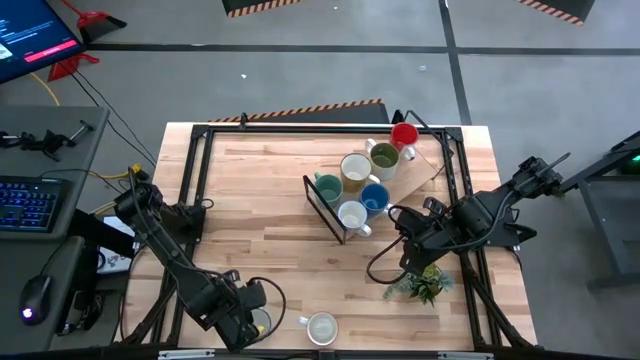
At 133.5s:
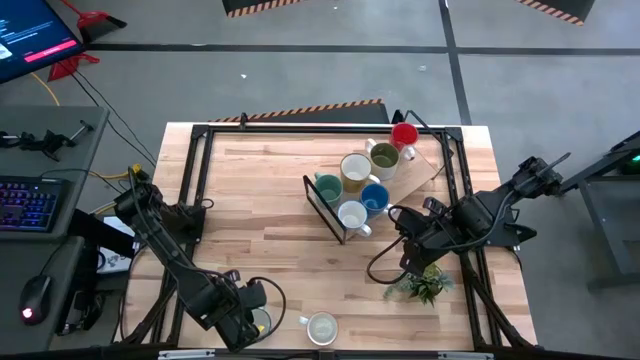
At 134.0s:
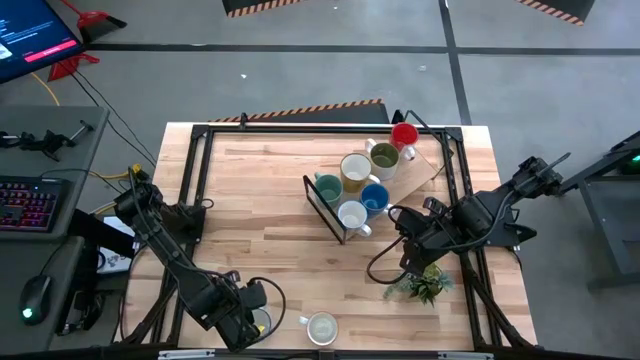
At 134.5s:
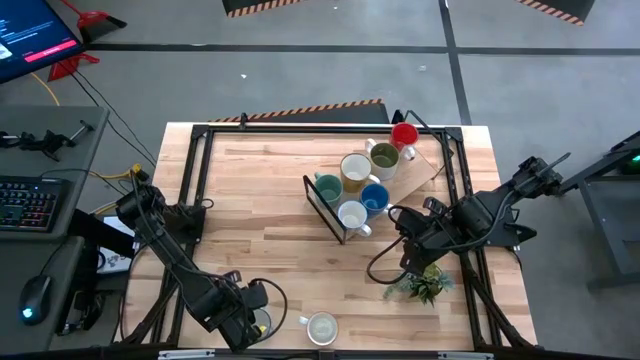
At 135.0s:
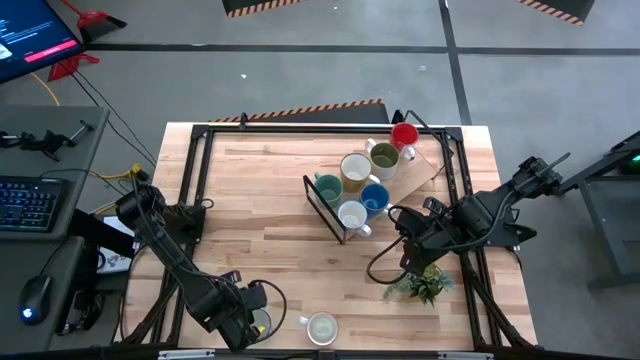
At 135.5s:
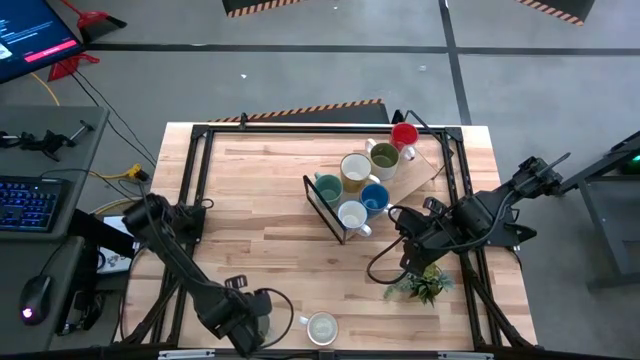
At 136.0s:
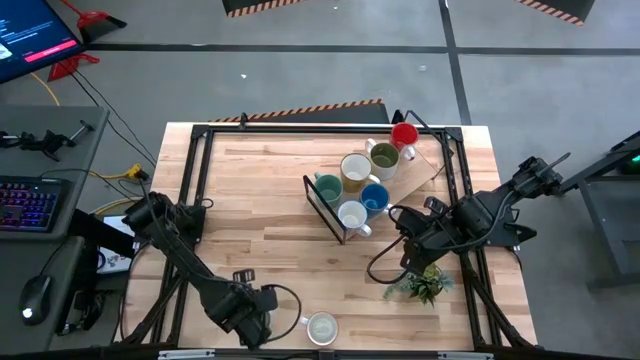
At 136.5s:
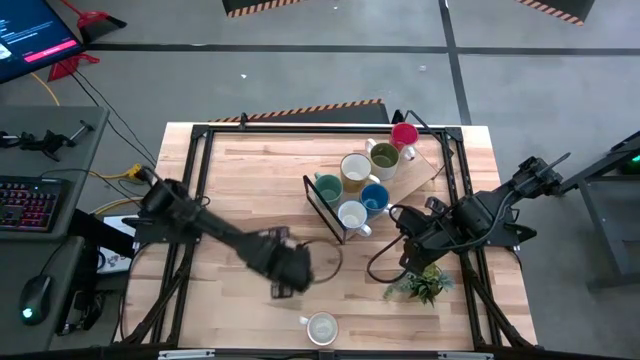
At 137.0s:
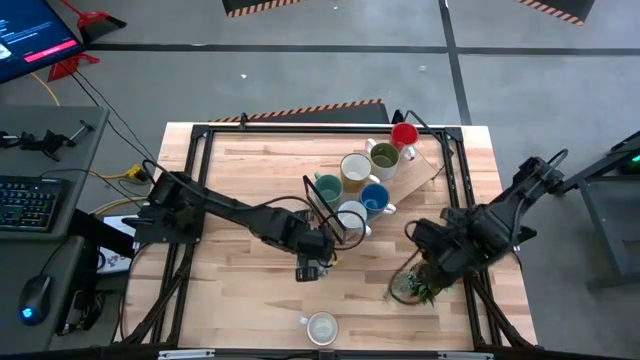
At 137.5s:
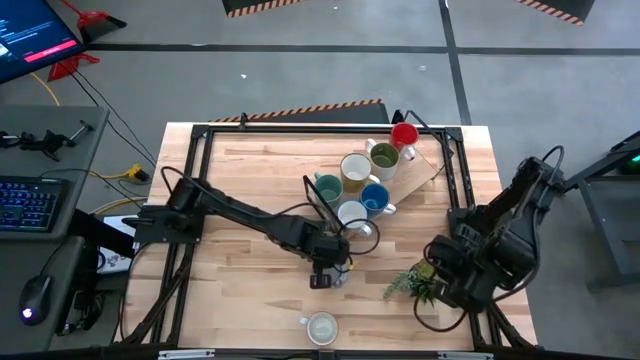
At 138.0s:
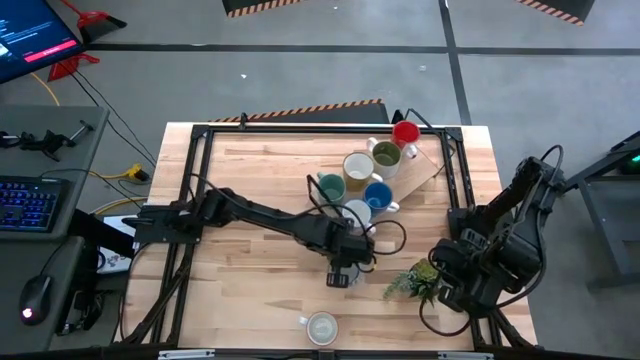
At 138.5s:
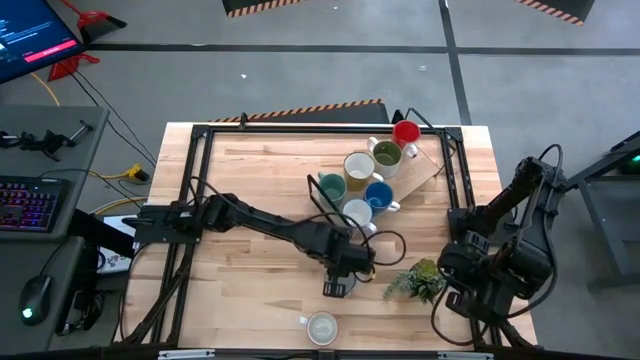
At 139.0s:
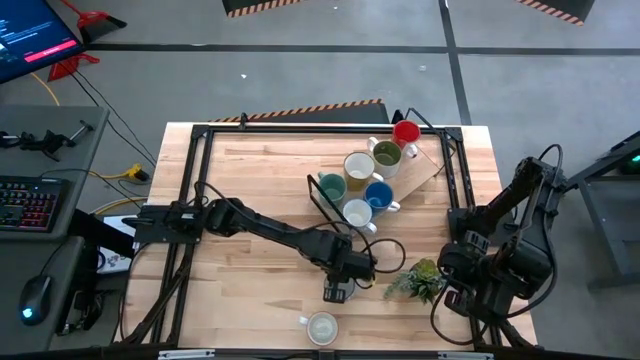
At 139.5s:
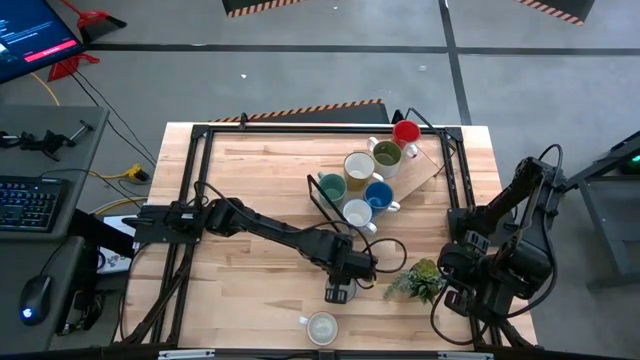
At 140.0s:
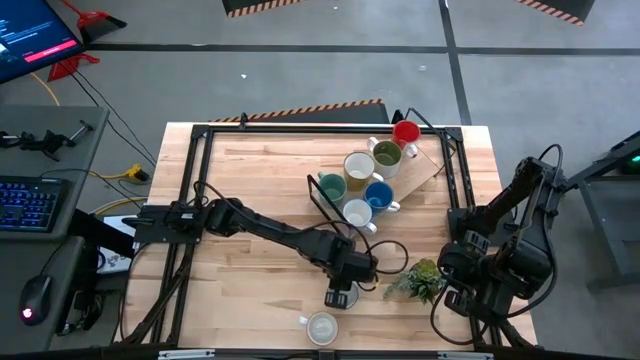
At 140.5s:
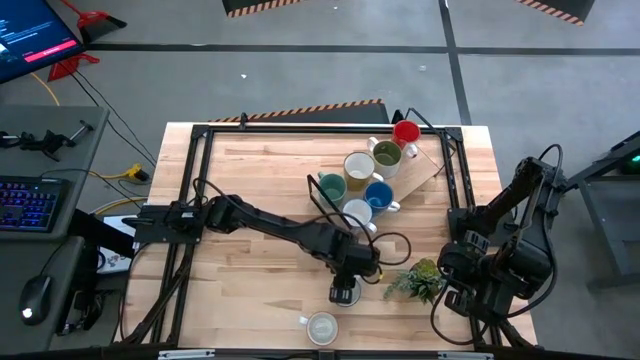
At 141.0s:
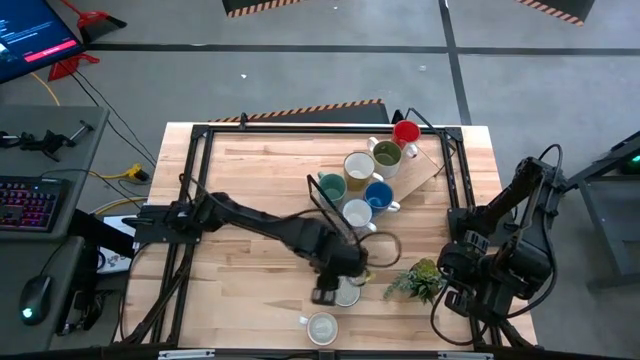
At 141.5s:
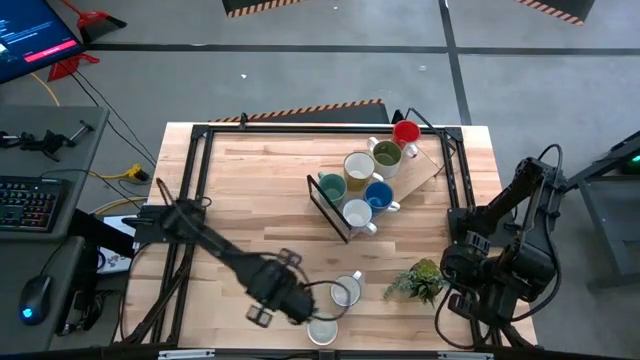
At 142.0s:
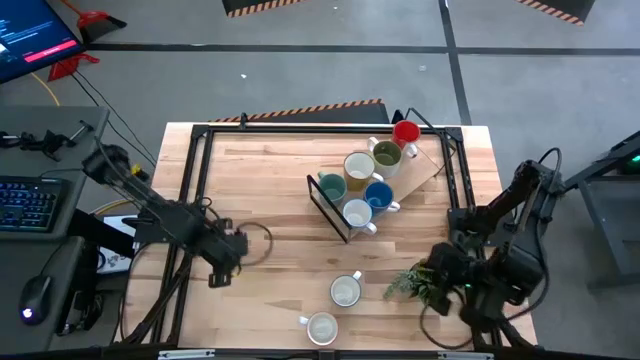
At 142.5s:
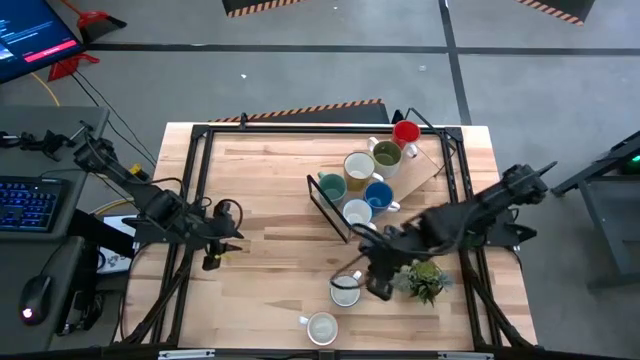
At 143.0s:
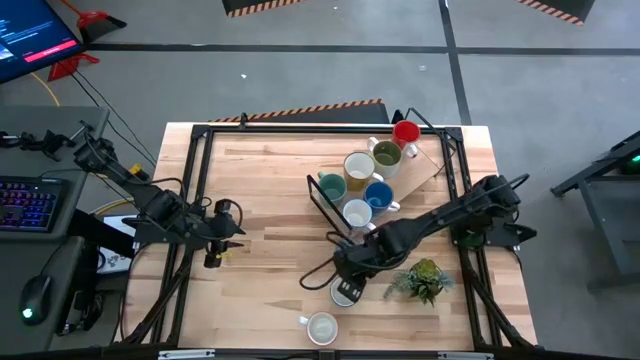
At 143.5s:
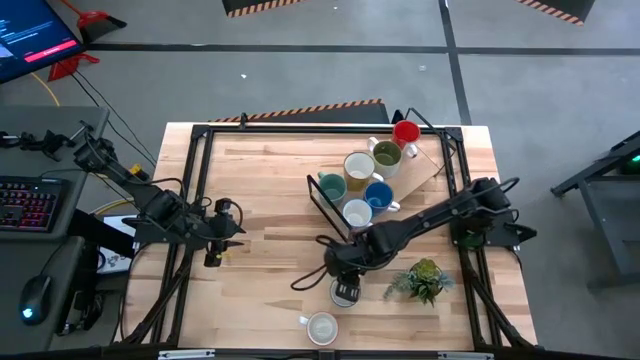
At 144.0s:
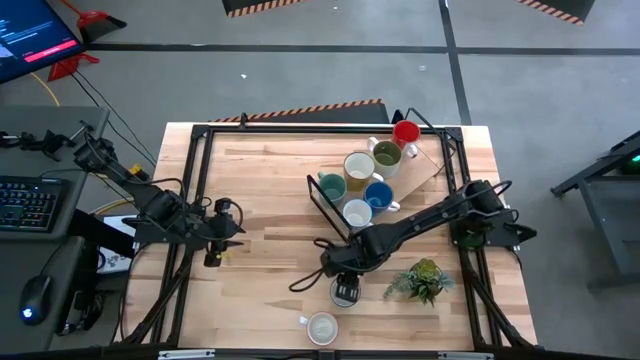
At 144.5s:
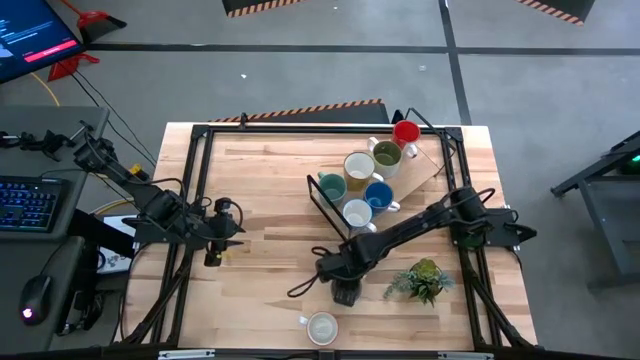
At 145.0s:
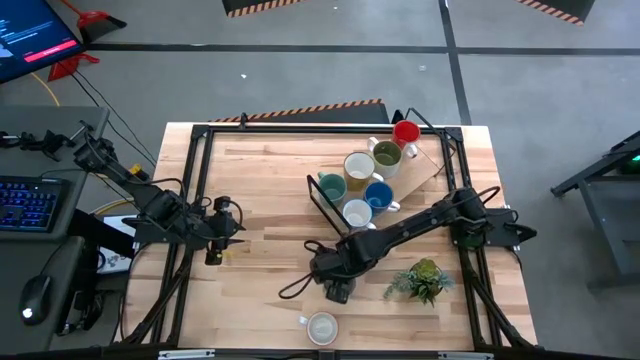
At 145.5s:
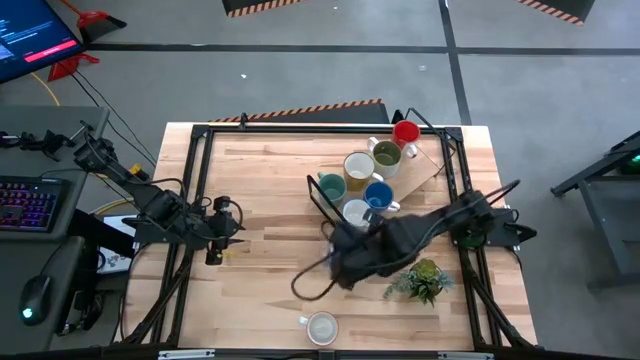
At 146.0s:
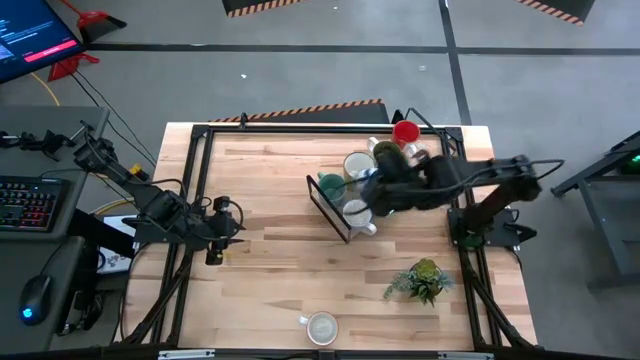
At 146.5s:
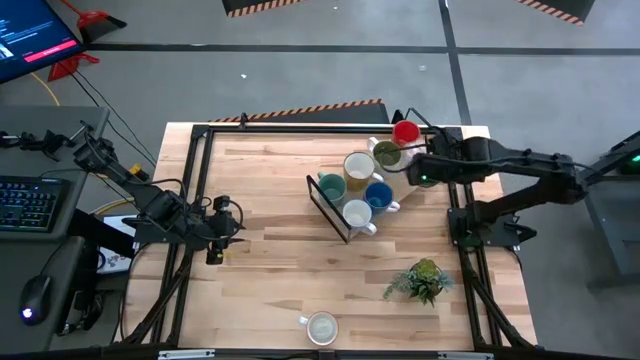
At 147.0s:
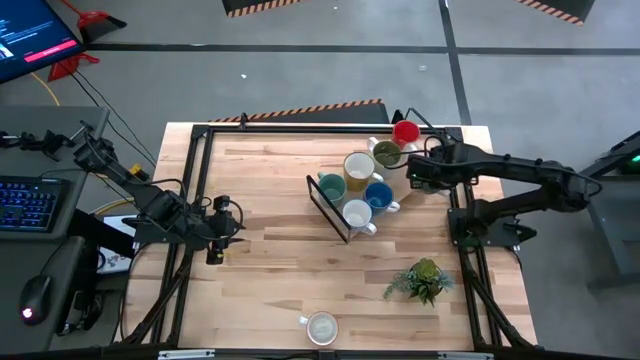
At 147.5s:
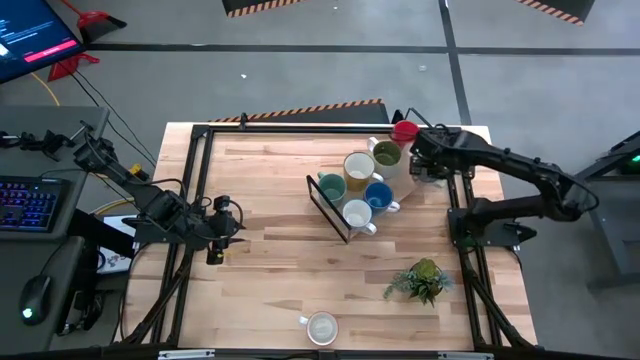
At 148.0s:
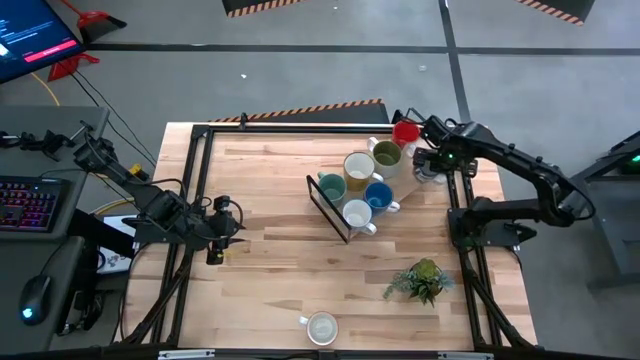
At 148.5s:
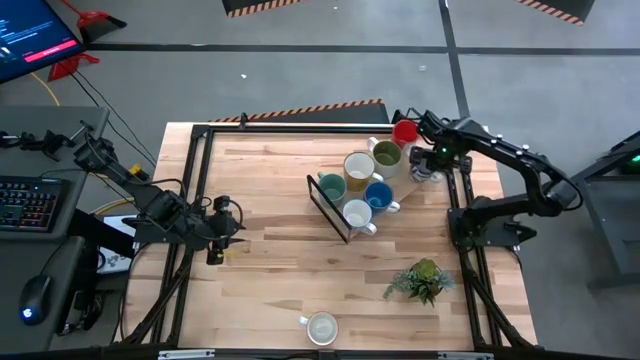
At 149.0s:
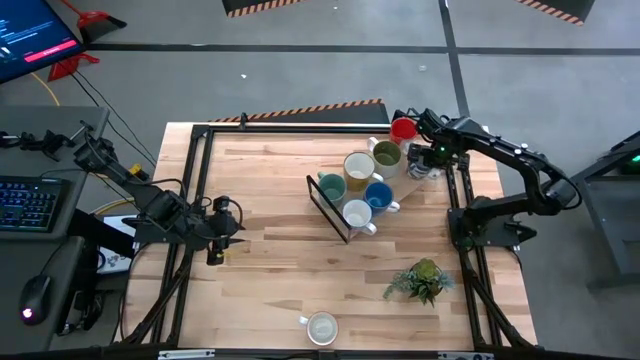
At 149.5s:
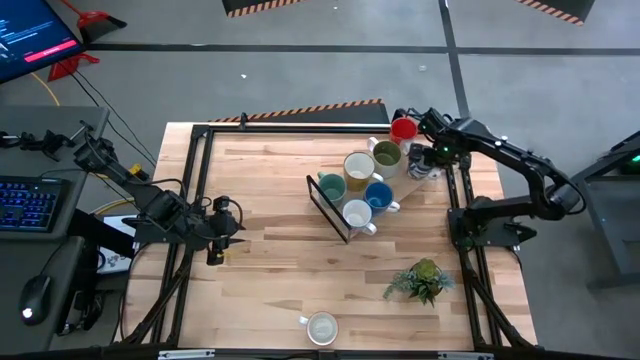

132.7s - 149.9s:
Task: Place coffee mugs
Put the blue patterned mug on the shelf

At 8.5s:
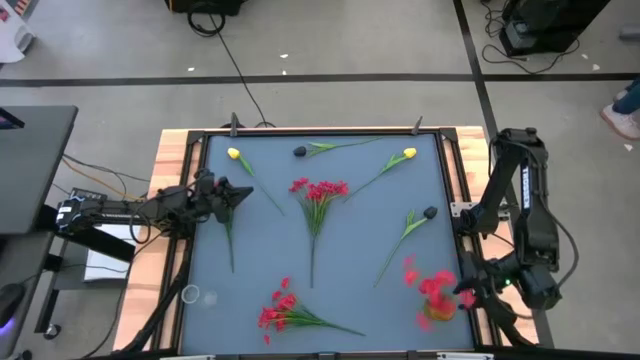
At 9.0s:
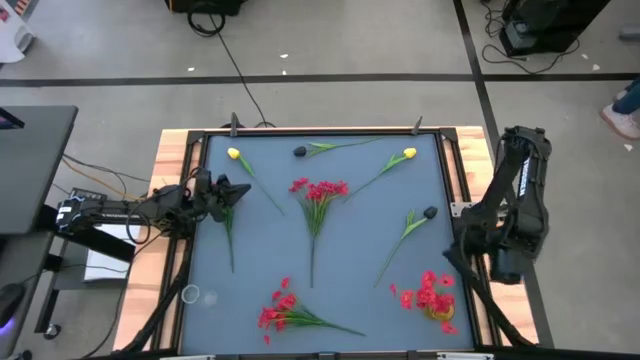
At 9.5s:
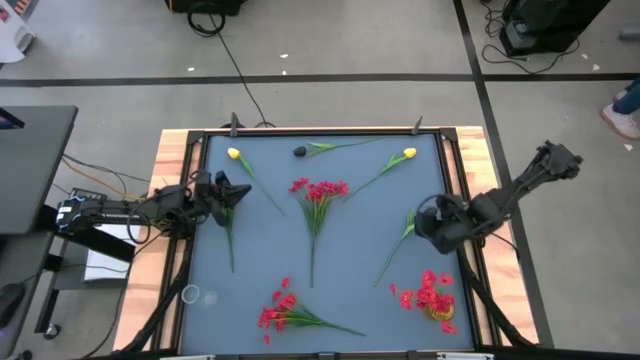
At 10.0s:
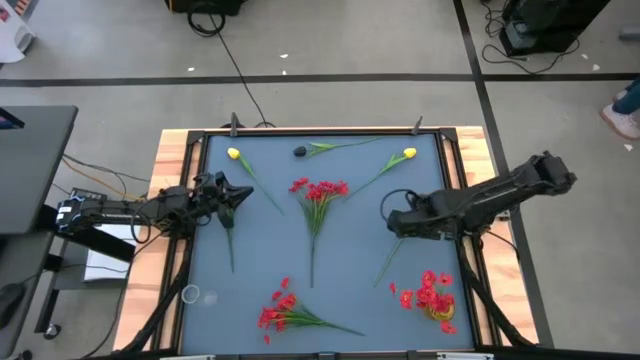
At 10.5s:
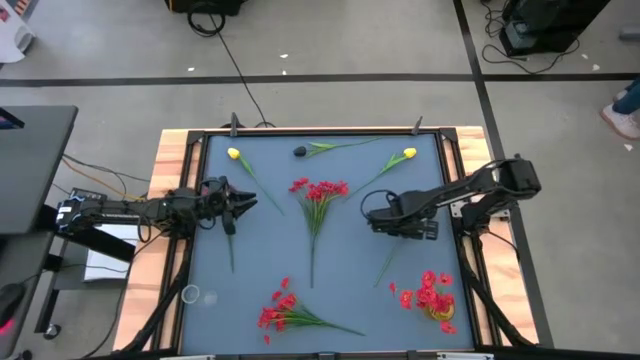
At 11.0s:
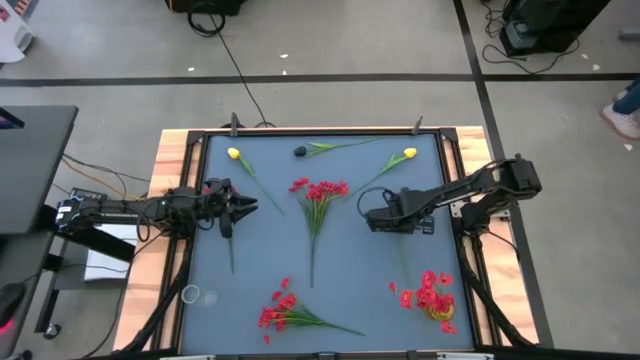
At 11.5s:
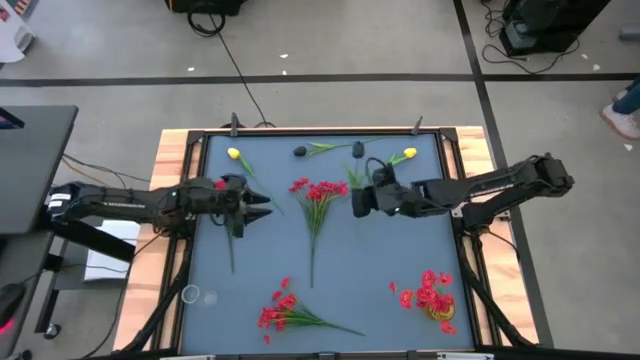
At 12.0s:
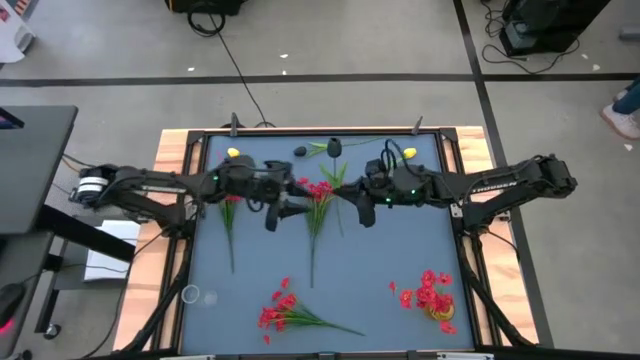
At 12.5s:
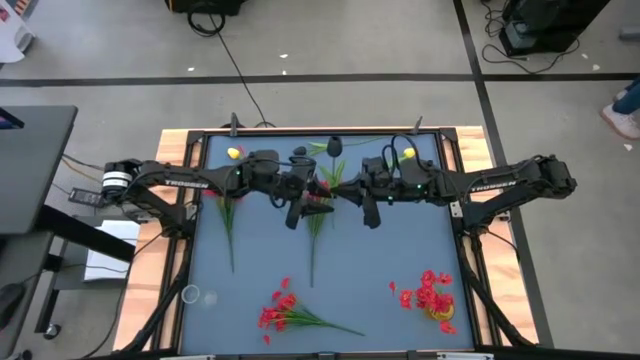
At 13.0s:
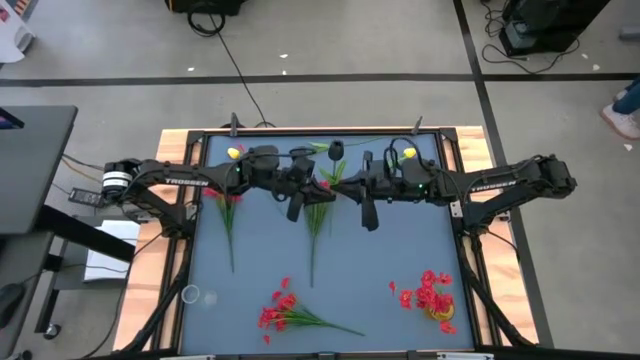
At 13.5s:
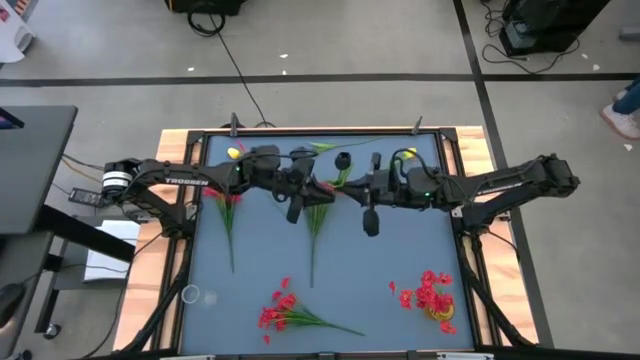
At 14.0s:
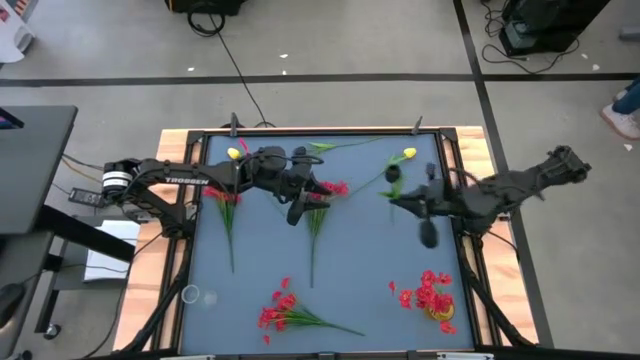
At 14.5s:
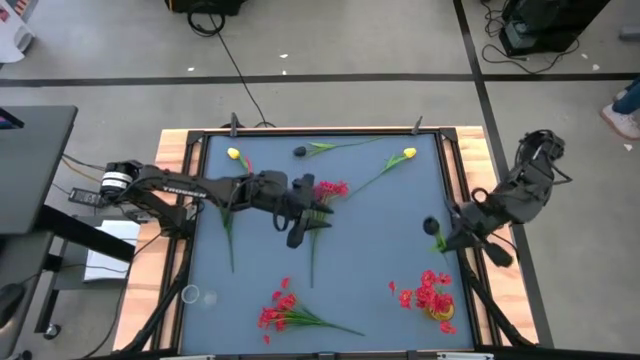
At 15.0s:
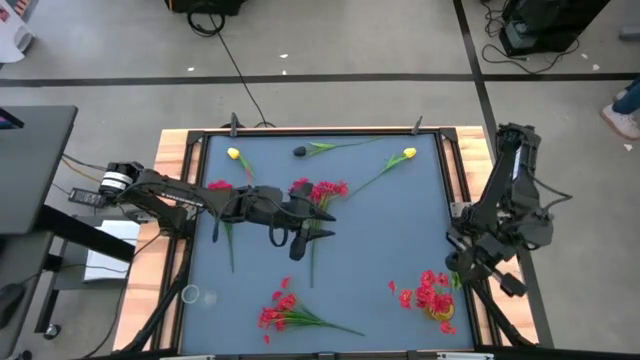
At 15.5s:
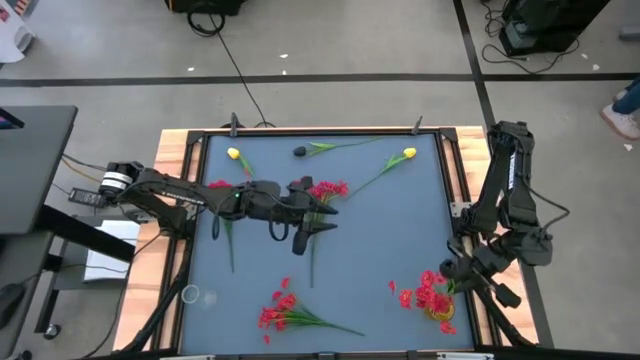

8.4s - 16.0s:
Task: Sort flowers into vase by color
Put the bottom black flower into the yellow vase
